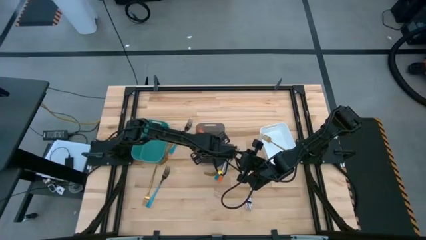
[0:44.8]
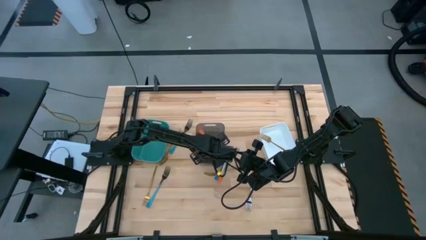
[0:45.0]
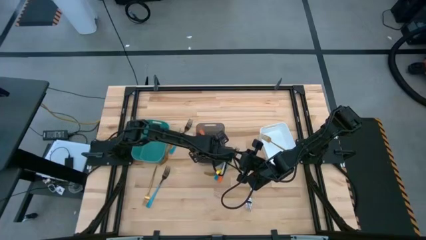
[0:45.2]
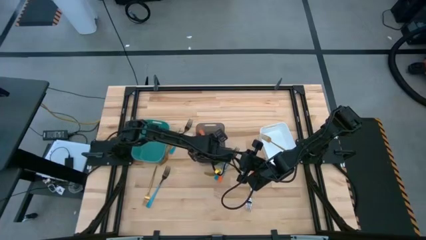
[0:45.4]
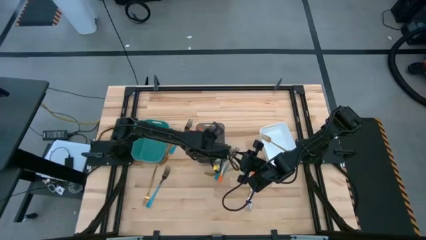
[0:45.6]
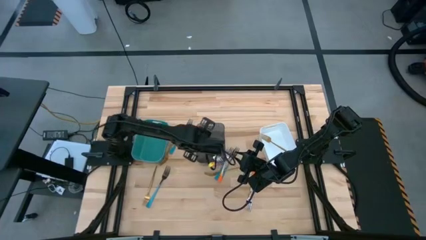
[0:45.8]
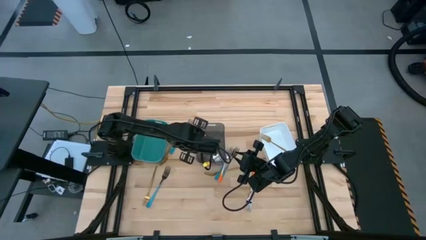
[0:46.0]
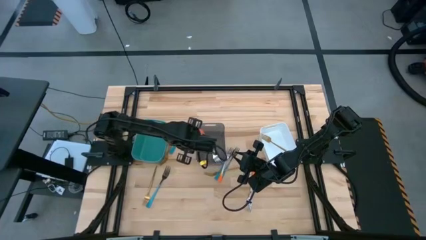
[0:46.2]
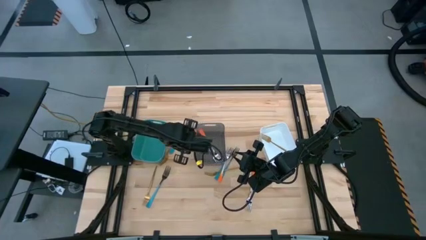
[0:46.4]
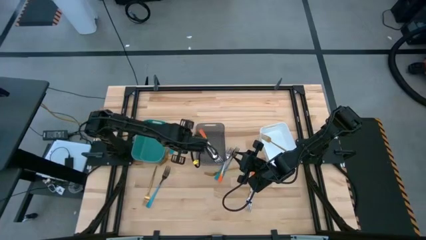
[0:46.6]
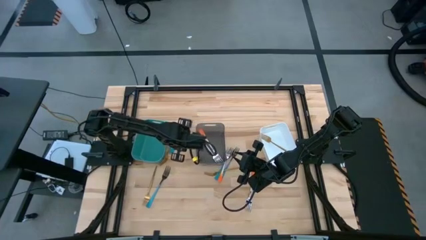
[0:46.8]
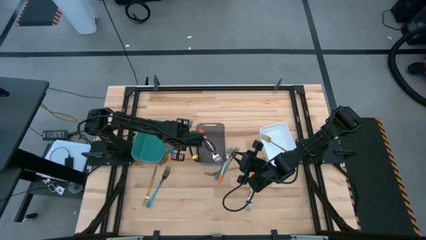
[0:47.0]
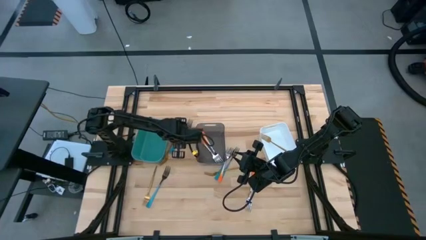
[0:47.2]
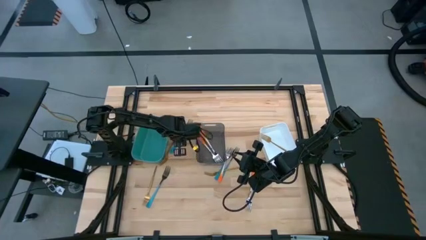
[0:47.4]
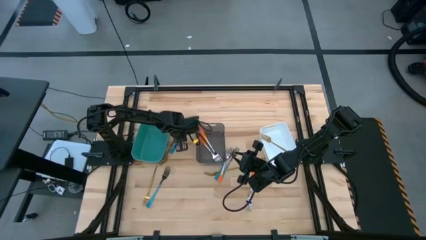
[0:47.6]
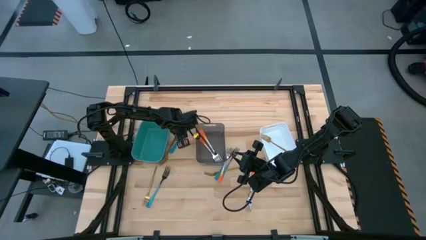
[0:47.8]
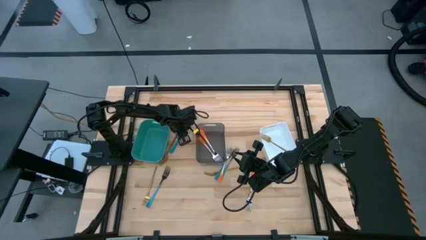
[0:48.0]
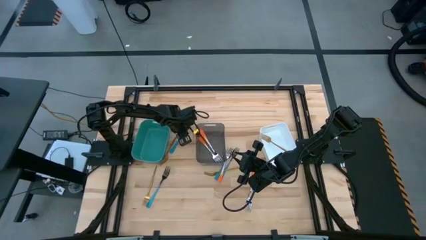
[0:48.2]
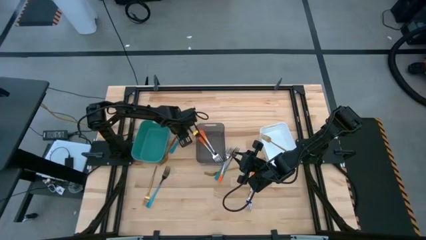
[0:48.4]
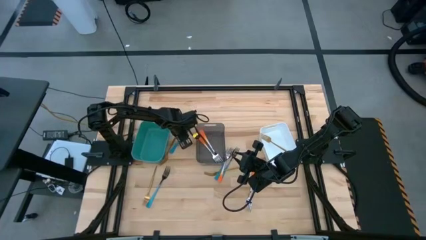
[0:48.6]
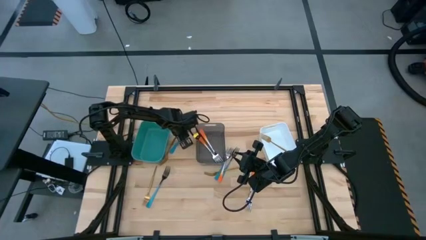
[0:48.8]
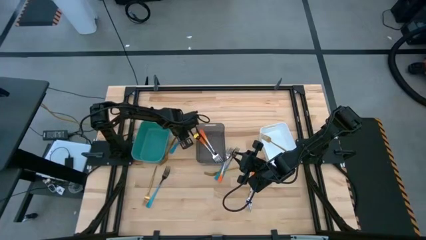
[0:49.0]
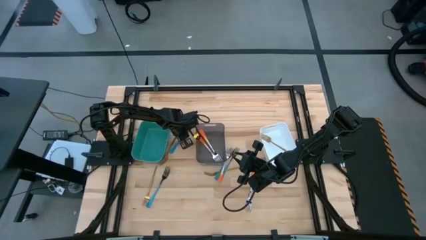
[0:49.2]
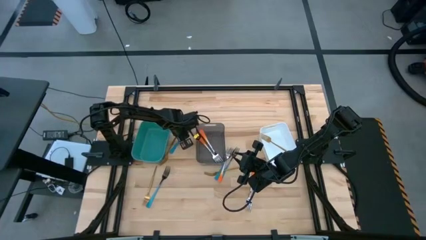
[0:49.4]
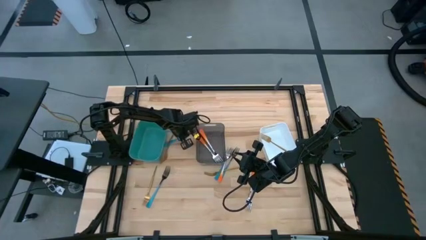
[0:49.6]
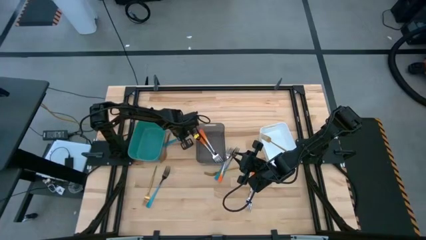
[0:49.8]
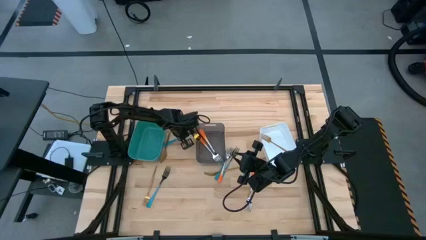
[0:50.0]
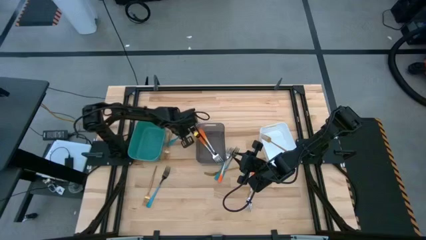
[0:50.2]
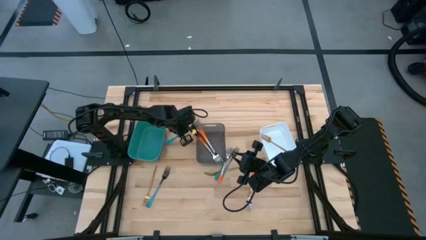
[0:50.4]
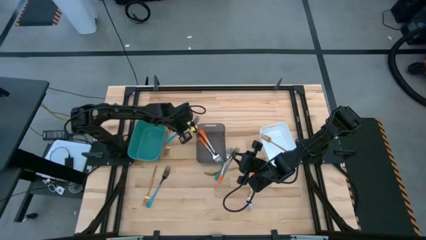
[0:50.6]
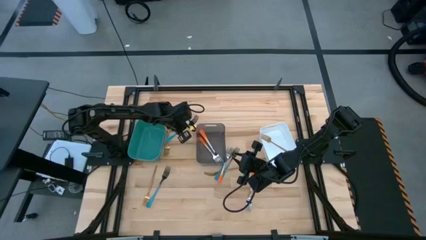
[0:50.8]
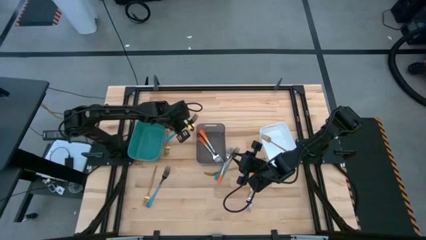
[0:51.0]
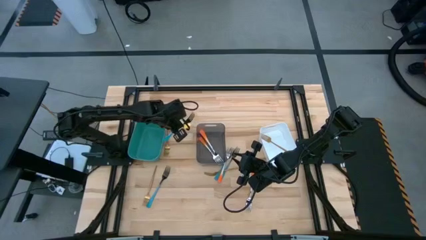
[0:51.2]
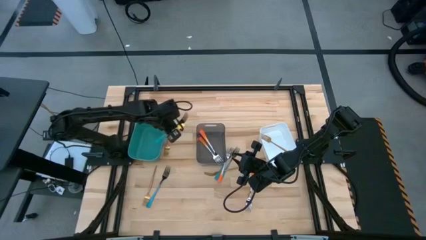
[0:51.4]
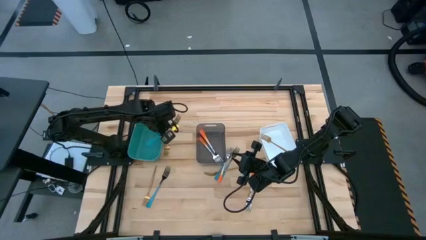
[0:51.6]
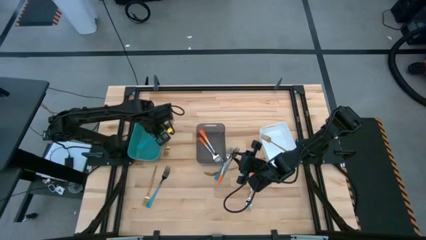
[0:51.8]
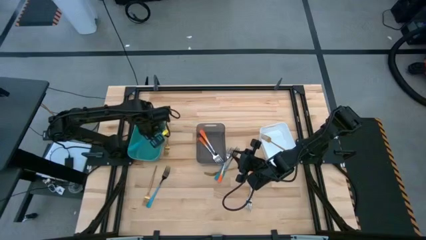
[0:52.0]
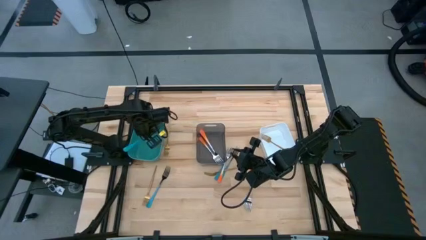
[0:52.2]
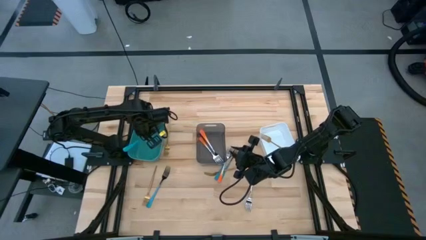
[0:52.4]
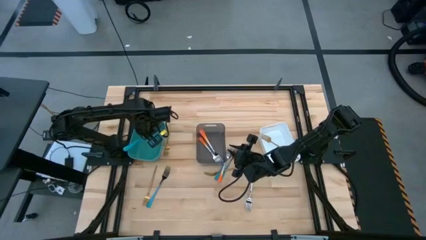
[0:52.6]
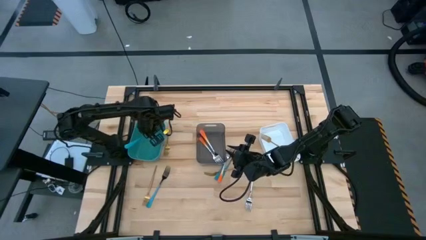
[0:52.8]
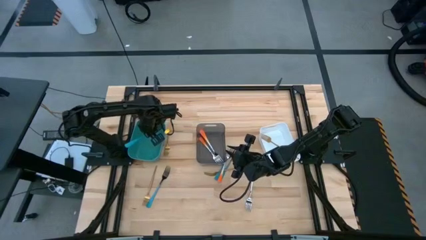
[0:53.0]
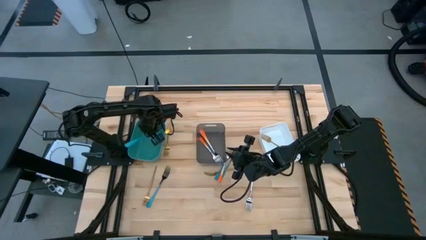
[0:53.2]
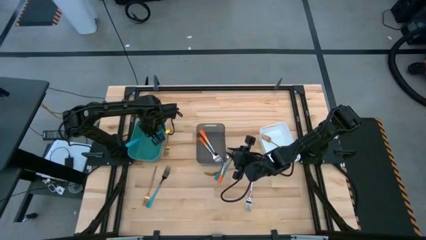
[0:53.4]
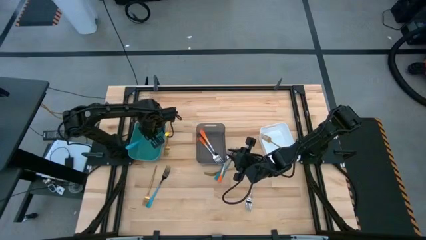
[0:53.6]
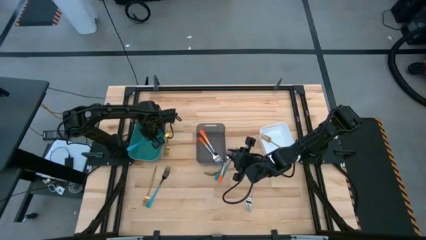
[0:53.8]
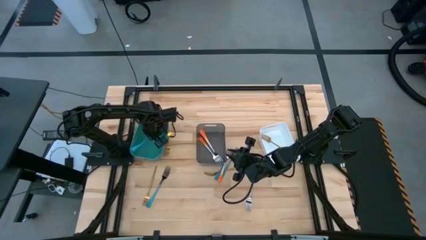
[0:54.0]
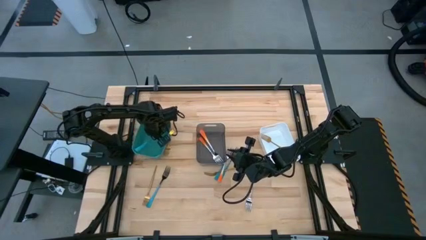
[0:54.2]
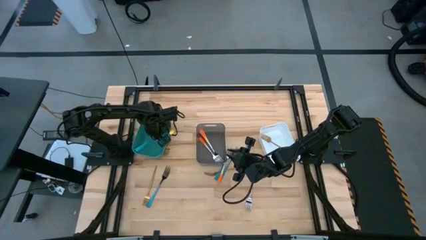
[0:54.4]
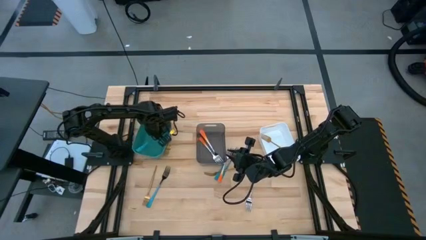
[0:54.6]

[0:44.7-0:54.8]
Task: Sort silverware by color (type)
Put the blue fork into the green bin

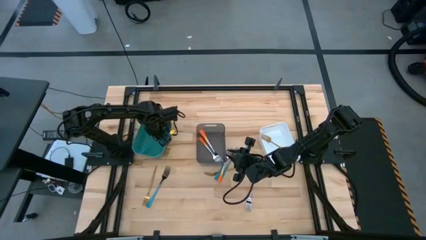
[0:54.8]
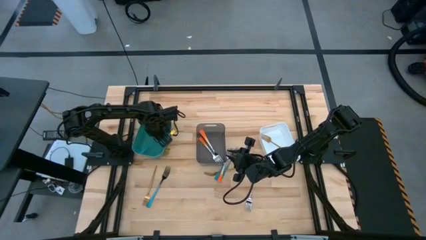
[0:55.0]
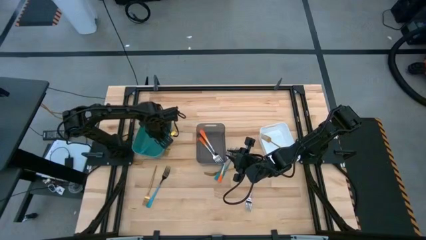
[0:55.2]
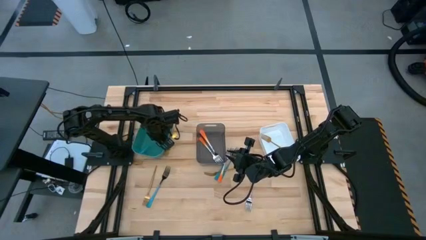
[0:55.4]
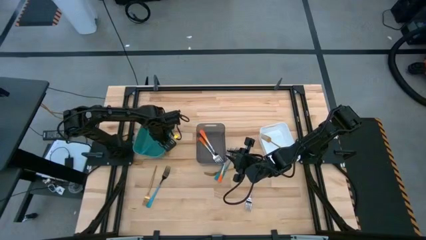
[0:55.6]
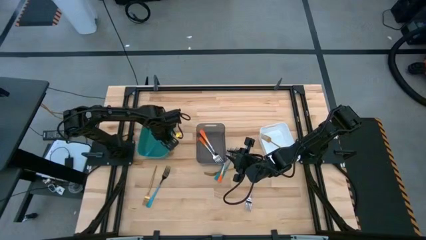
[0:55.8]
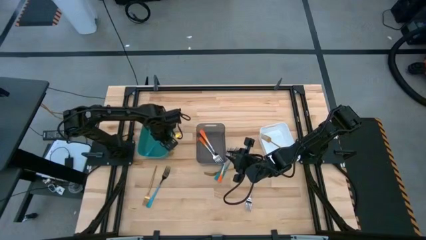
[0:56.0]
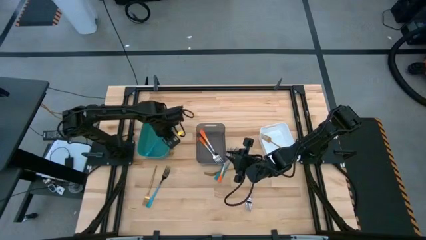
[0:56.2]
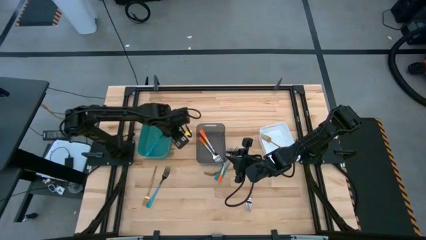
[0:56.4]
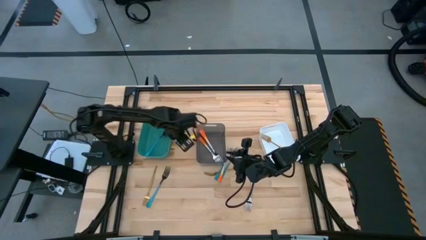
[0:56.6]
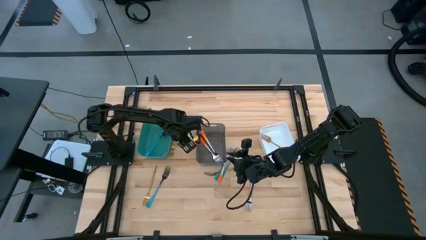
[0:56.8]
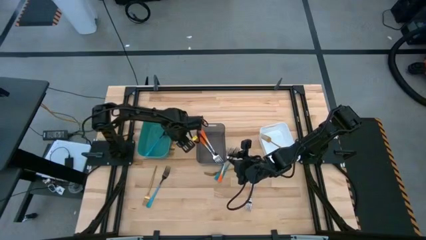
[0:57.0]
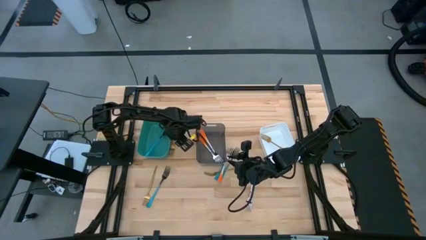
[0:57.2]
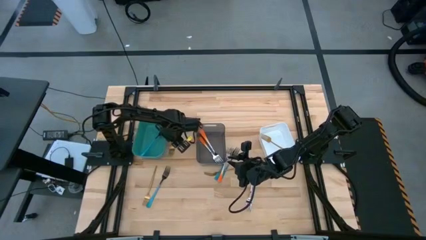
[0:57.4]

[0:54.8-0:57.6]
Adjust the green bin

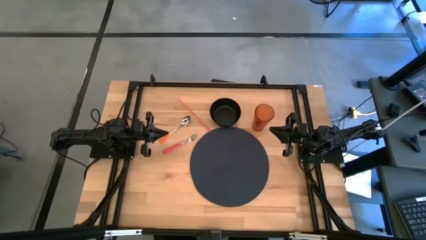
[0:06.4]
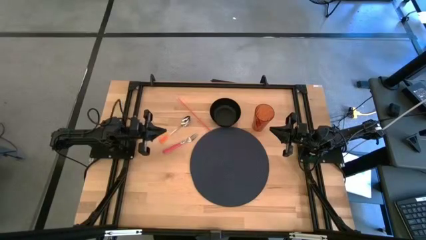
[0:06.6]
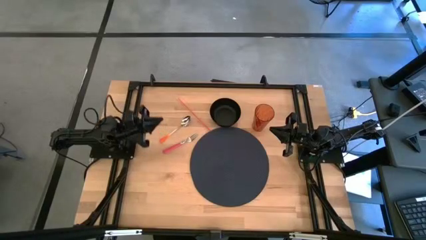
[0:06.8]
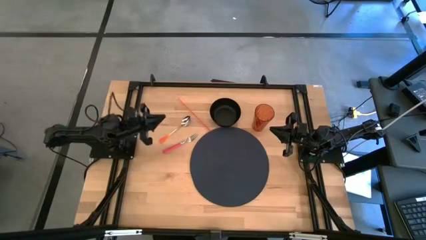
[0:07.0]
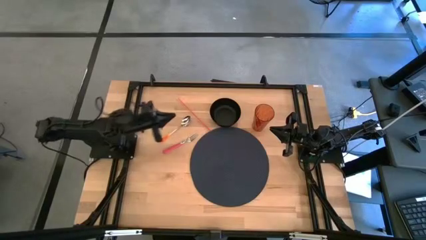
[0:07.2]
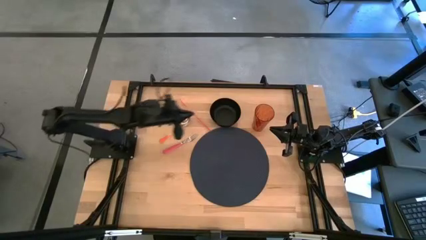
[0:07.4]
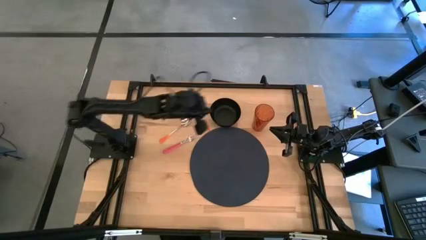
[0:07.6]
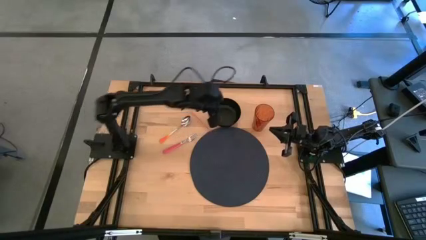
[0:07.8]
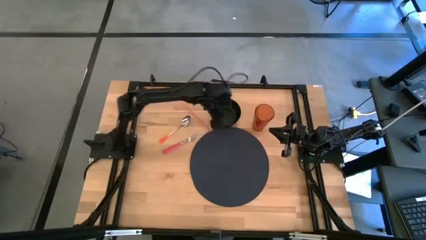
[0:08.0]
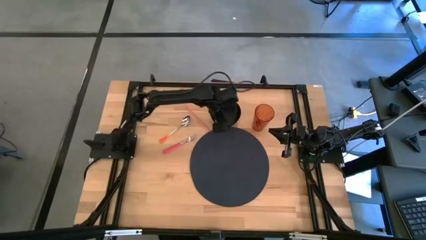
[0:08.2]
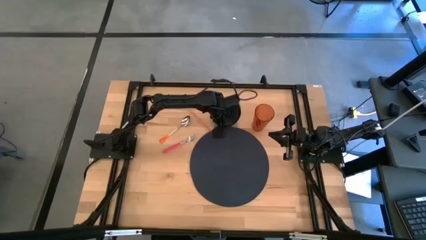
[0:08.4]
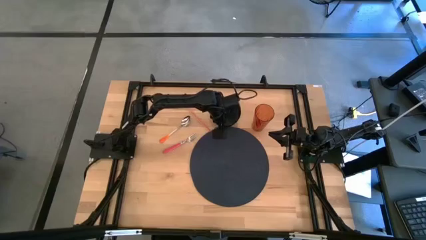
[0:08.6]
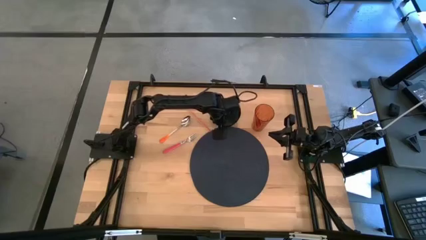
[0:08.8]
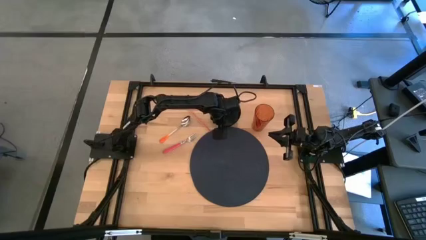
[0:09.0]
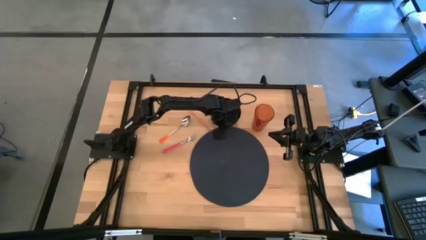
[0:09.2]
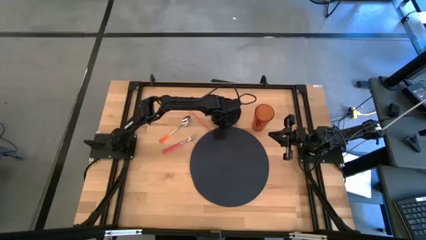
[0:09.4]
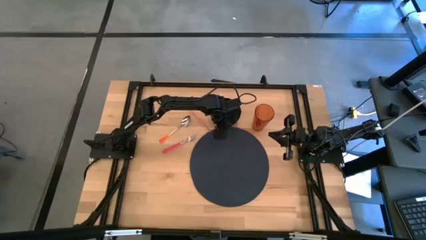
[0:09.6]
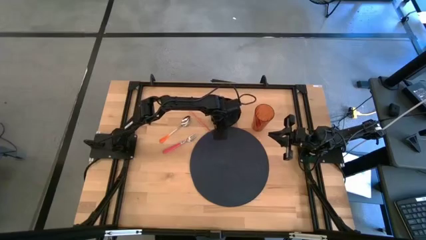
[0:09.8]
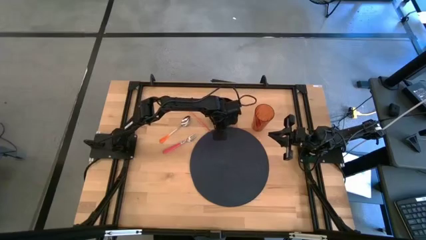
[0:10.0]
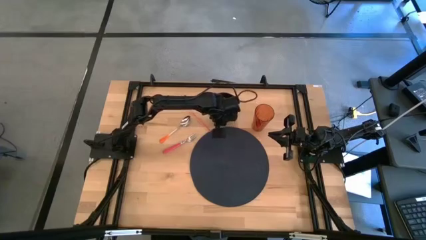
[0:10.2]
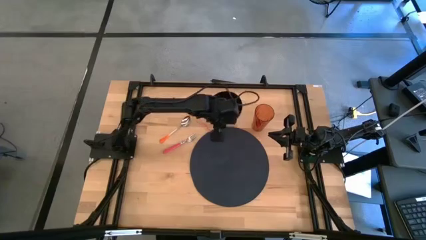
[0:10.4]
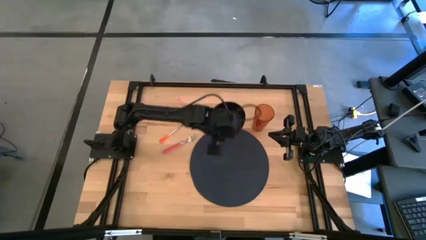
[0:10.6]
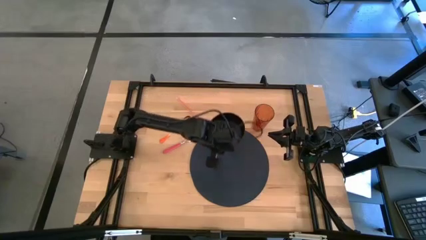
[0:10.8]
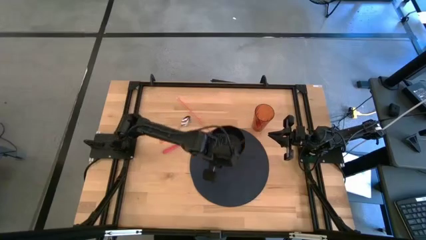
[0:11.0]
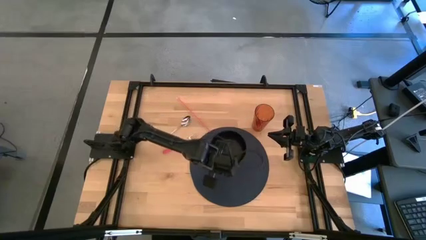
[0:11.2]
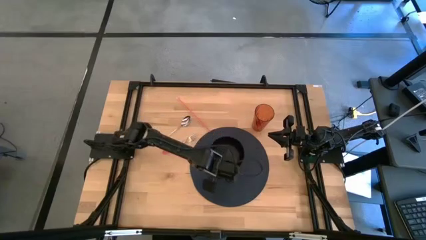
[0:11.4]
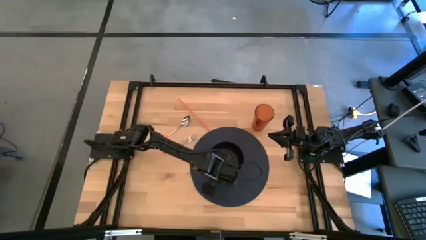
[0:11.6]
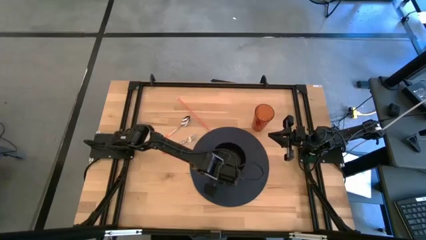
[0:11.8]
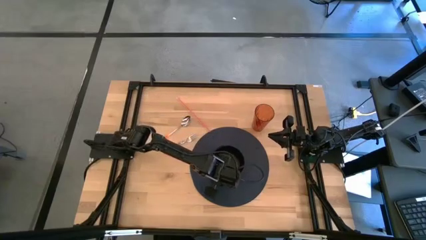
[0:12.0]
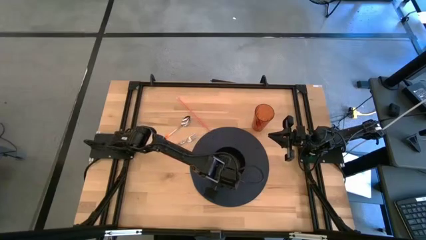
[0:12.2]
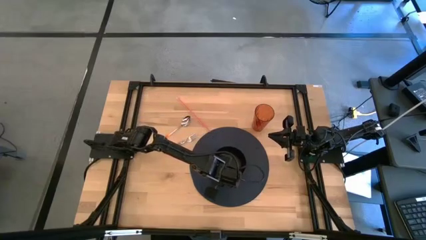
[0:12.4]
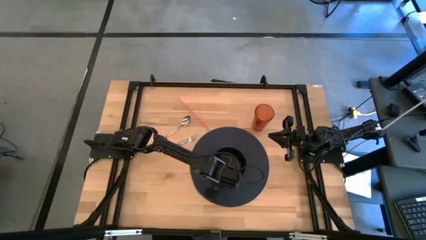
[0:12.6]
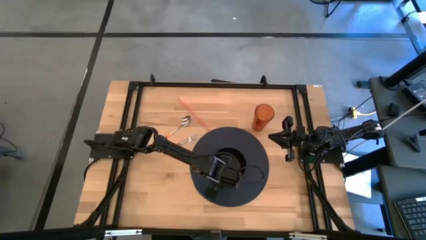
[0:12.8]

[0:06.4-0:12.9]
Task: Pick & Place Utensil
Put the black bowl on the black mat
